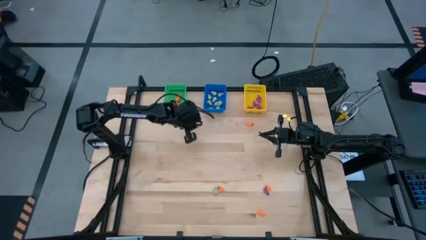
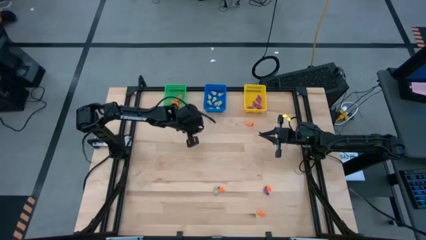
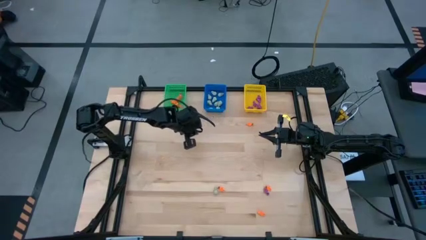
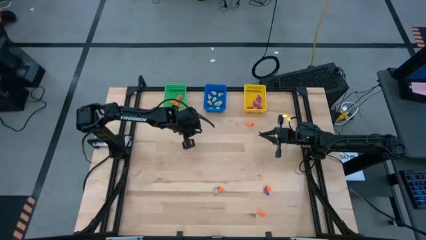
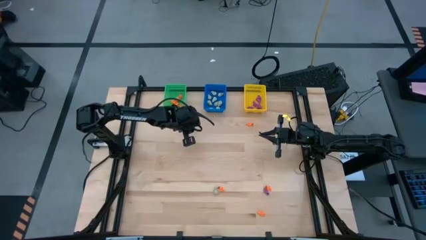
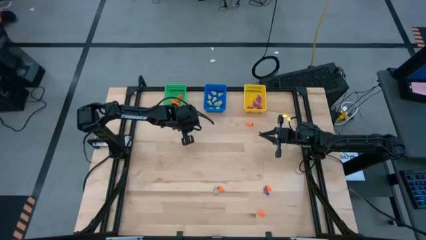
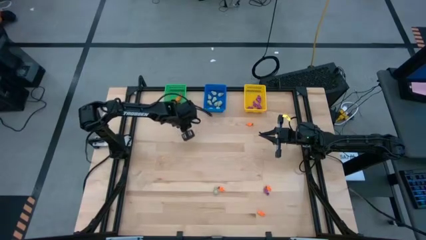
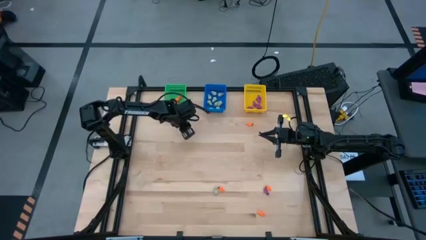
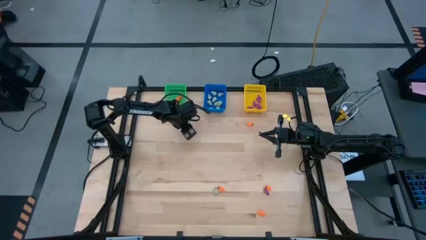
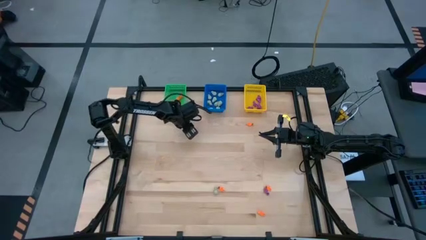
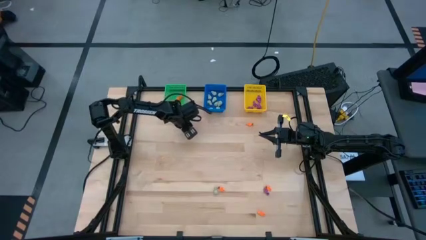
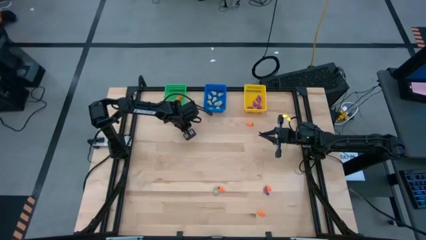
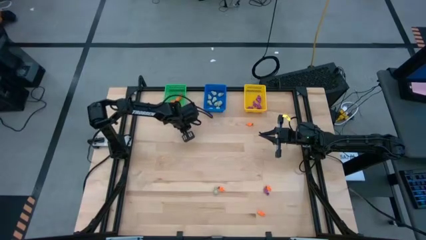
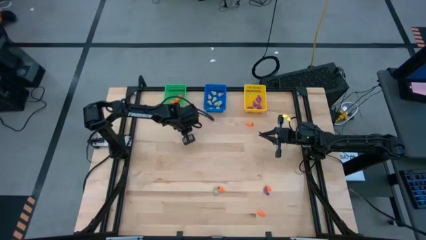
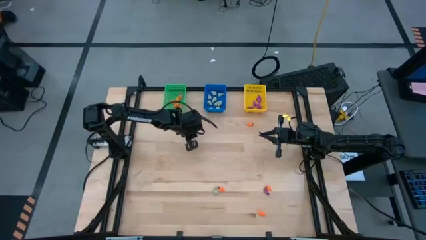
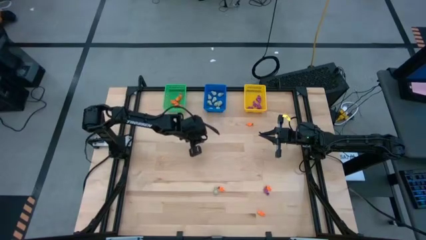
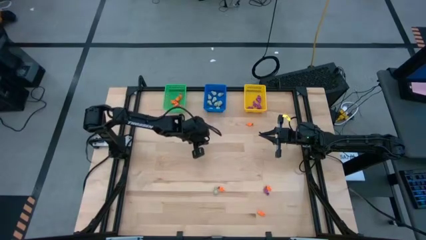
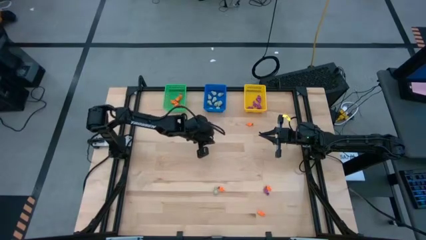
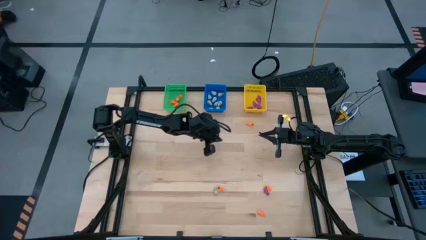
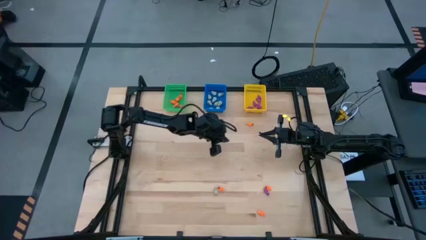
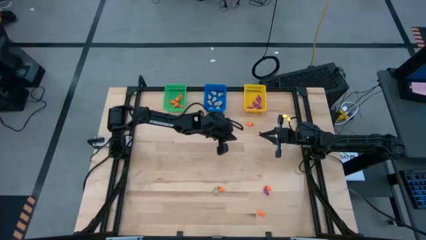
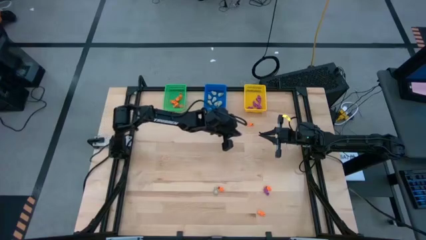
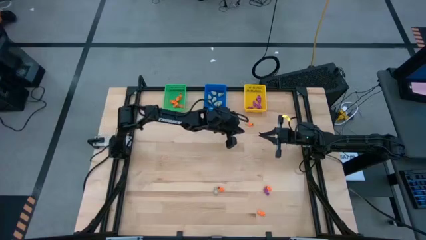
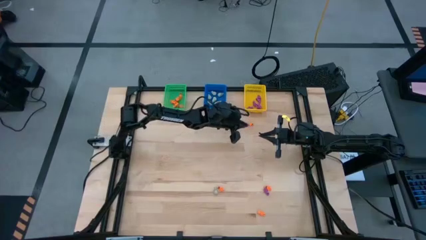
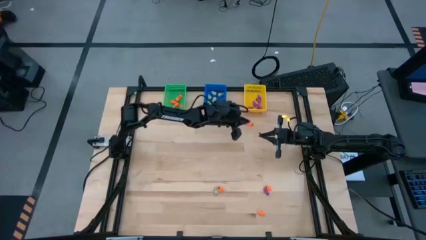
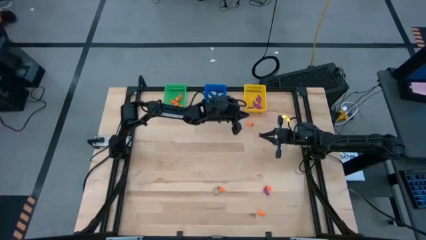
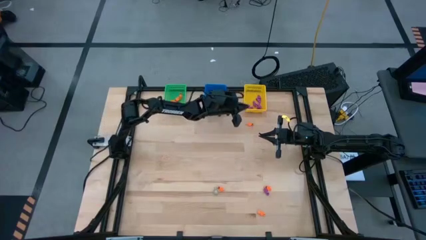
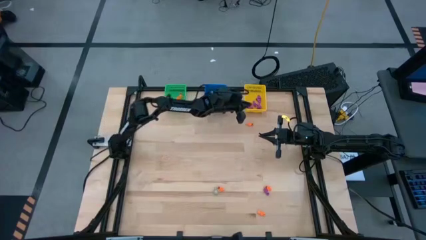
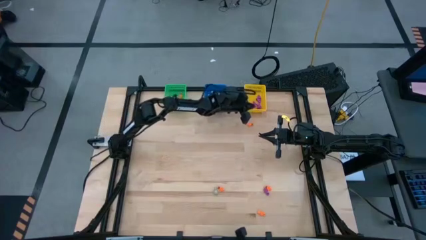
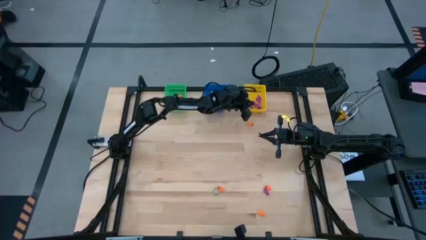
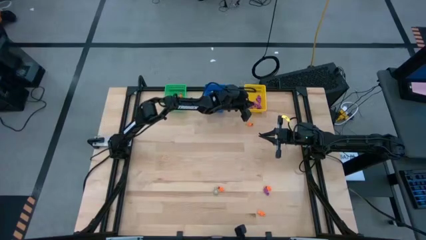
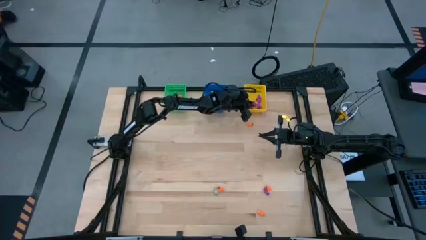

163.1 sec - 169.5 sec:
Task: Sort Halloween decoration
Put the purple skeleton toy into the yellow bin

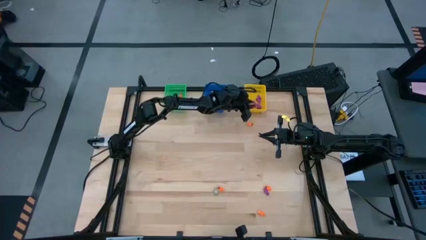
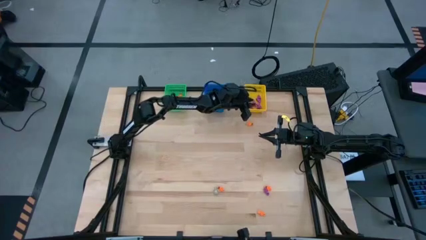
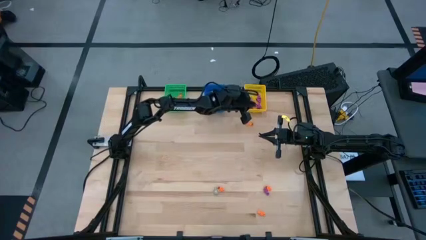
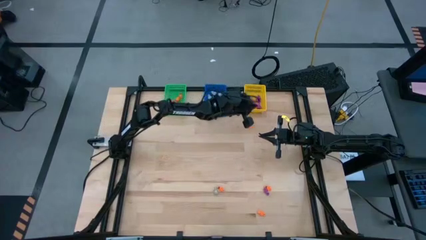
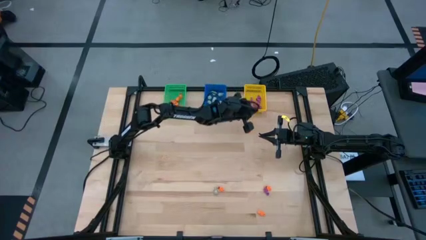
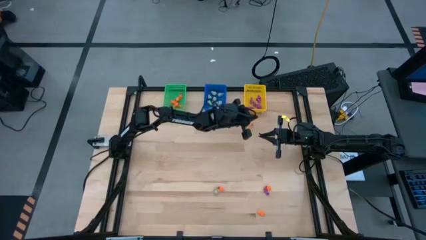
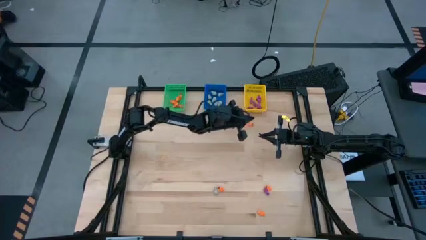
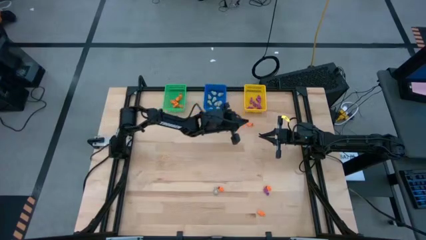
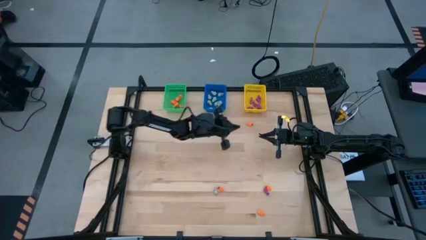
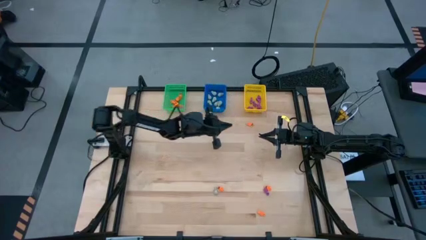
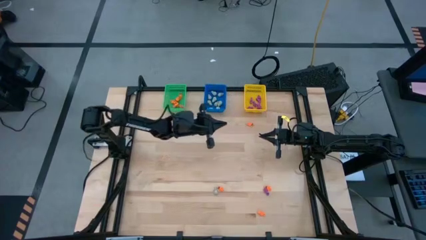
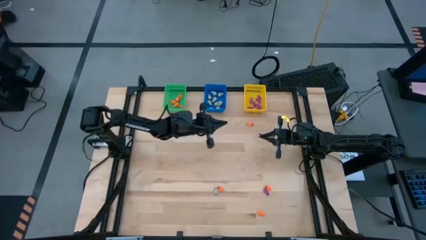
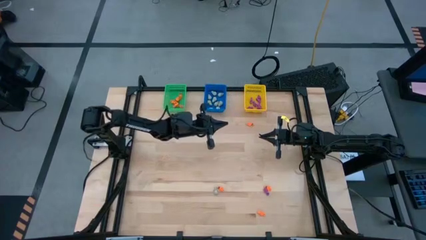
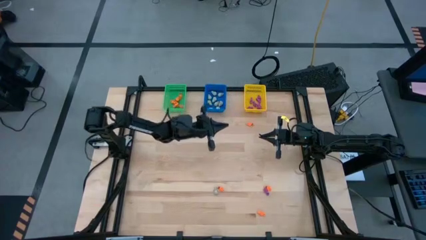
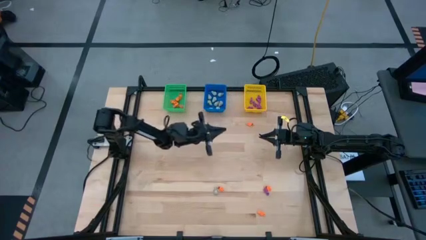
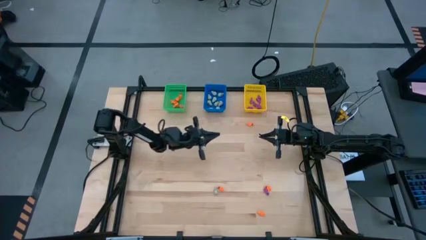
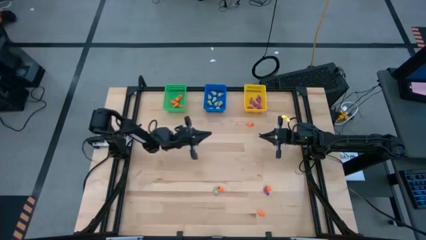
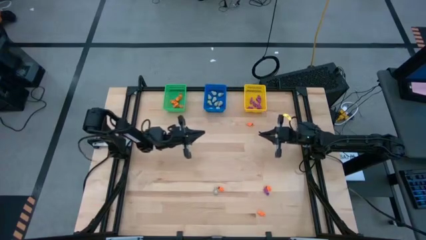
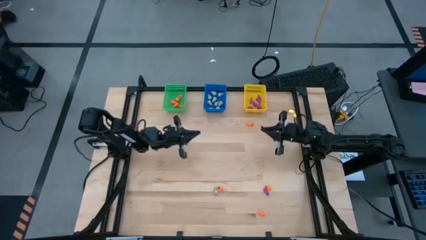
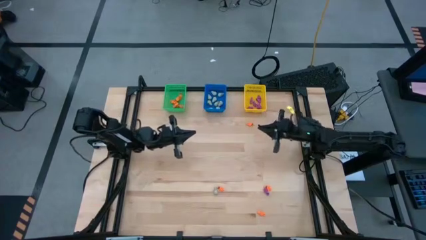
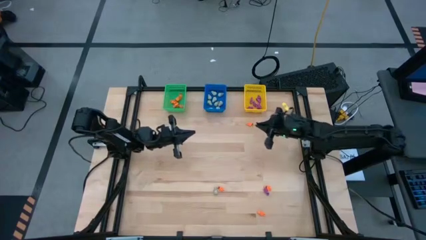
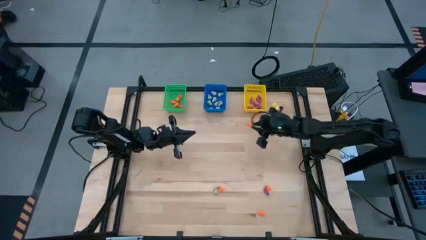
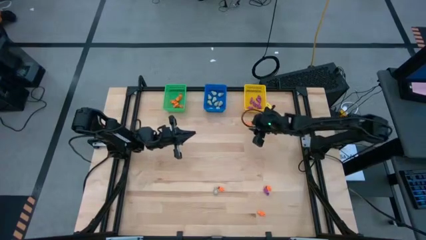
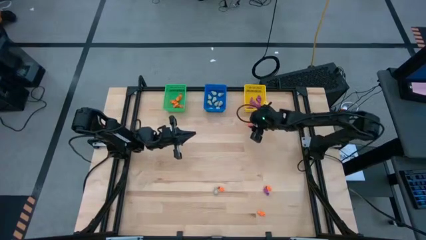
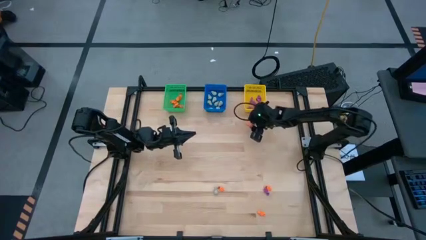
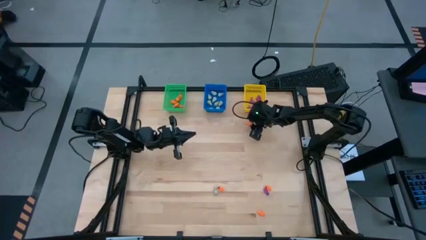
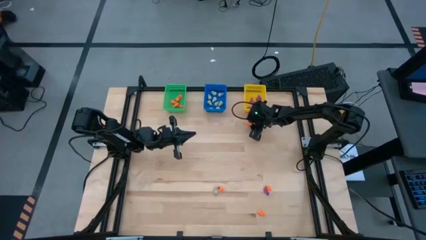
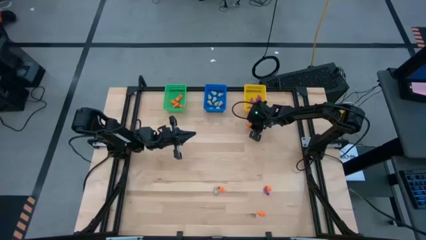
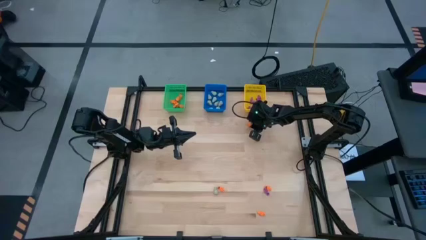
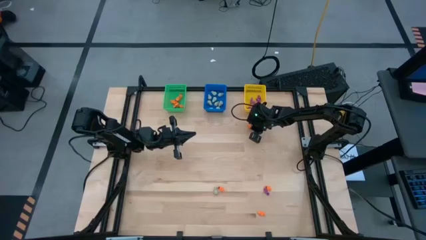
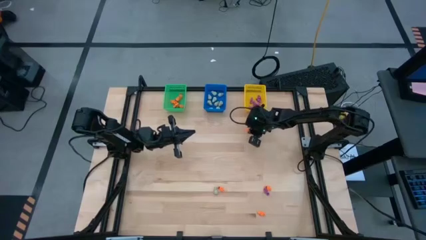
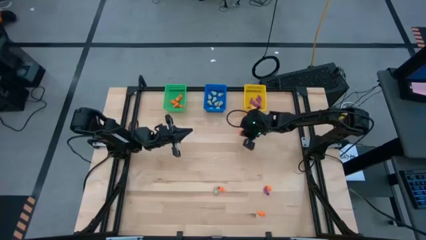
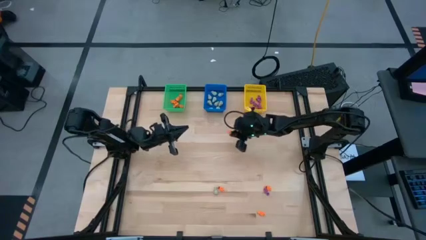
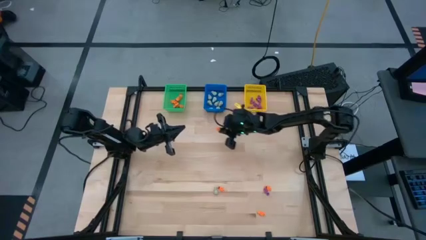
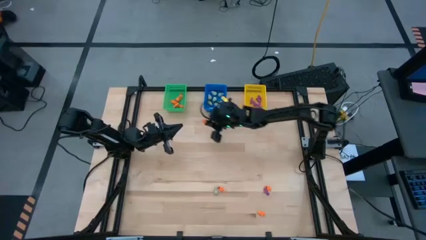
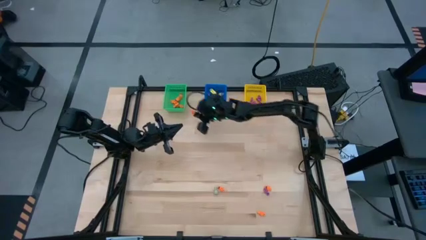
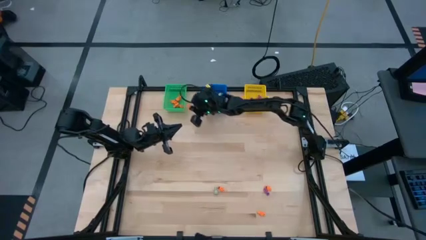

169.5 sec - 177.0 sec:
Put the orange skeleton toy into the green bin

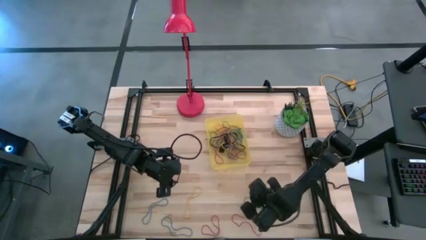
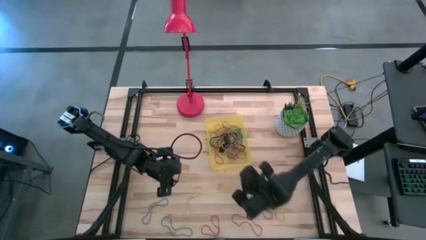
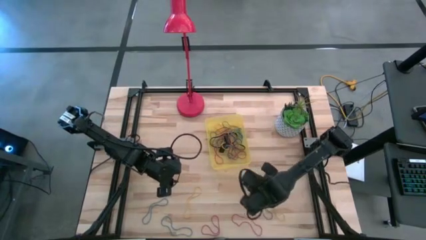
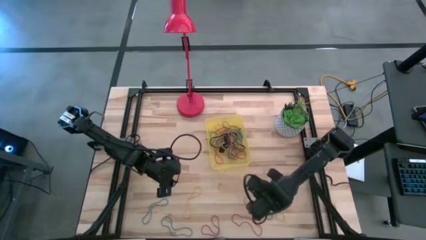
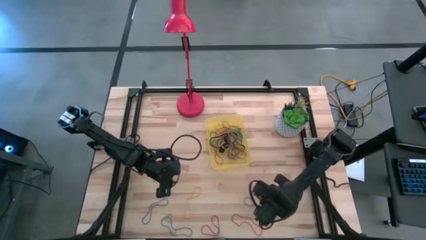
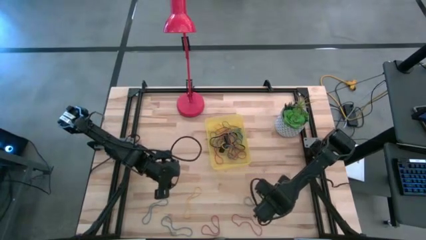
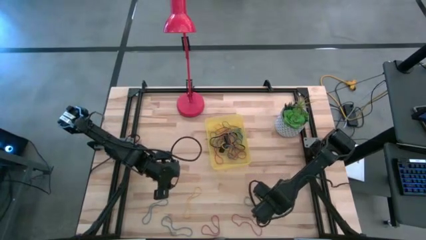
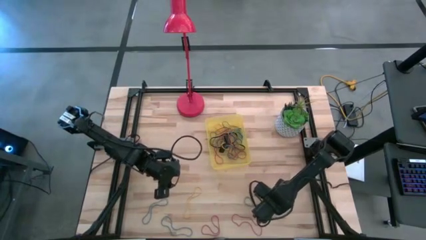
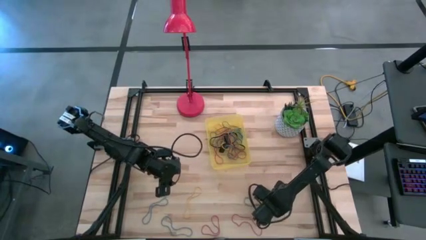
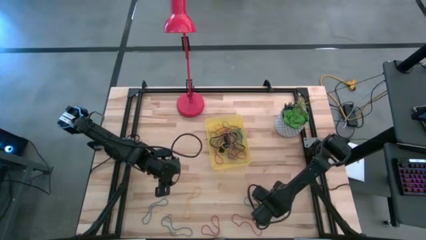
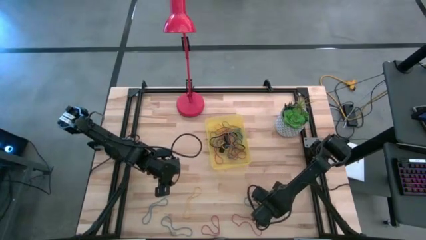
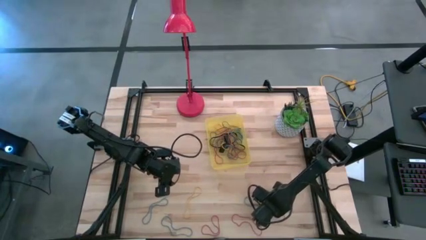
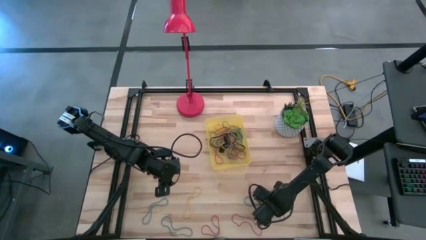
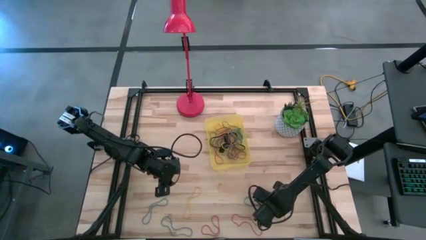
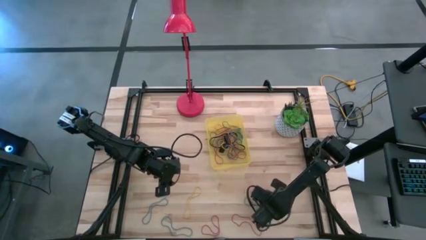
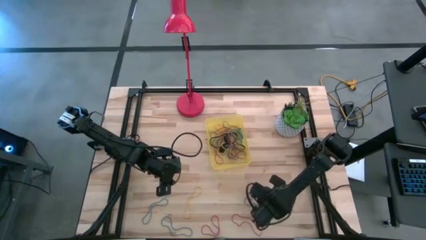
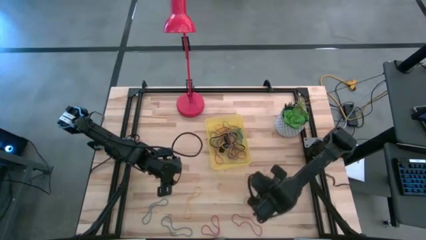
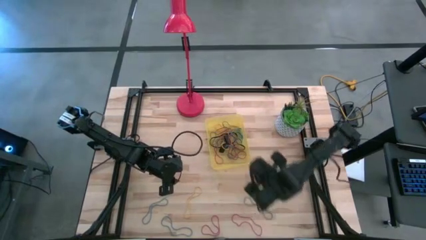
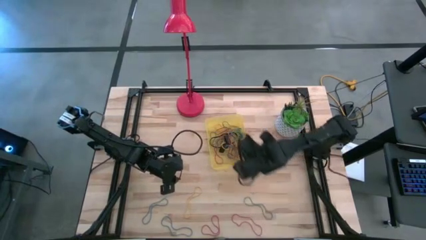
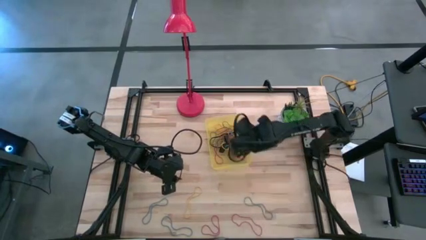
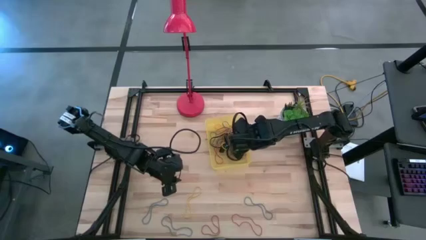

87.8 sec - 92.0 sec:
Task: Pick and place rubber bands into bin
Put the yellow rubber band into the yellow bin
